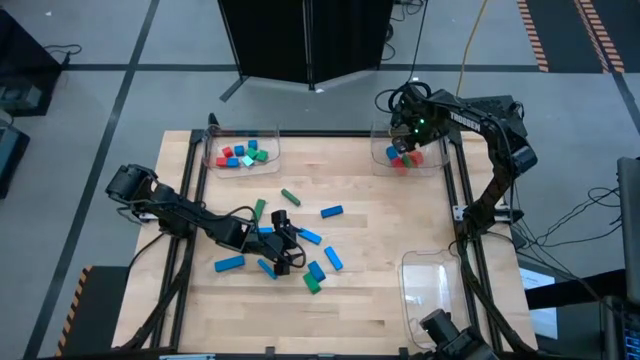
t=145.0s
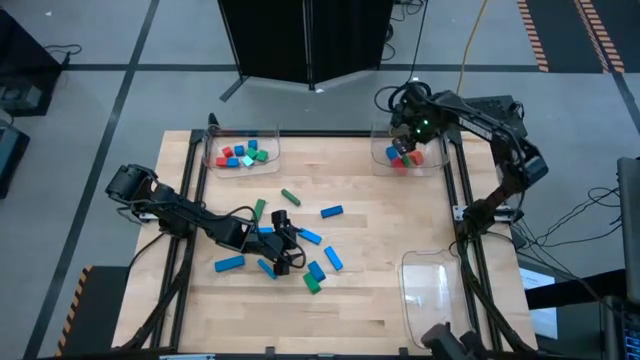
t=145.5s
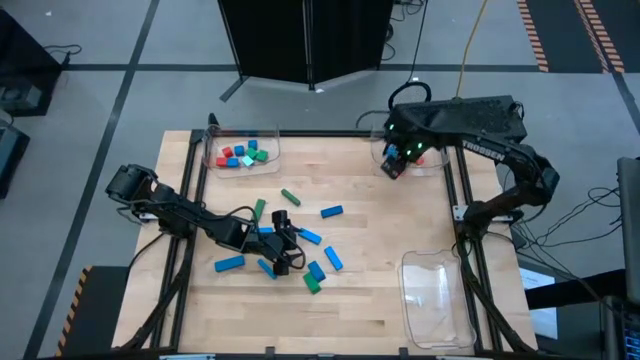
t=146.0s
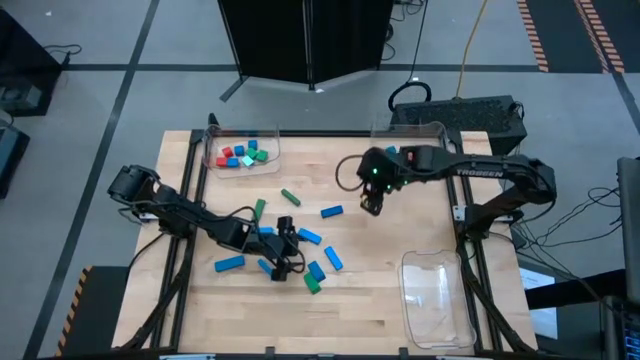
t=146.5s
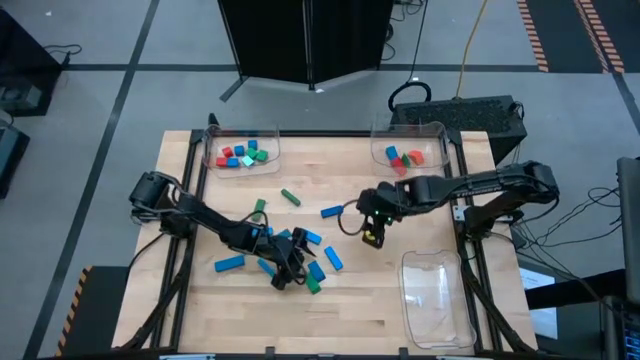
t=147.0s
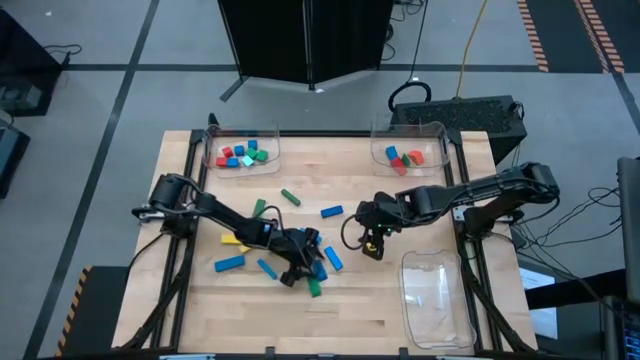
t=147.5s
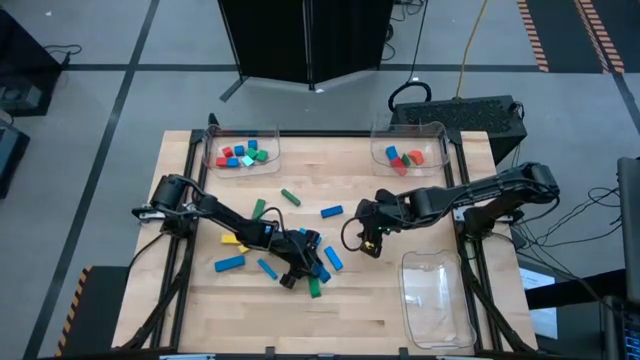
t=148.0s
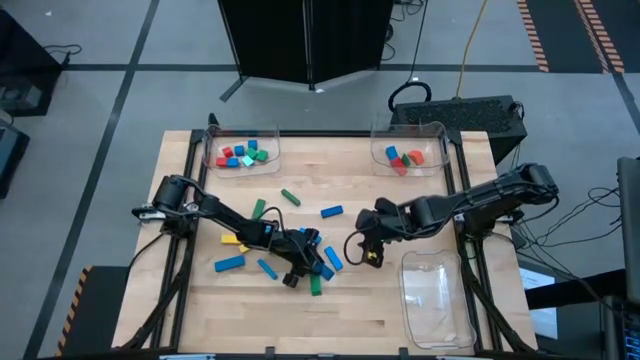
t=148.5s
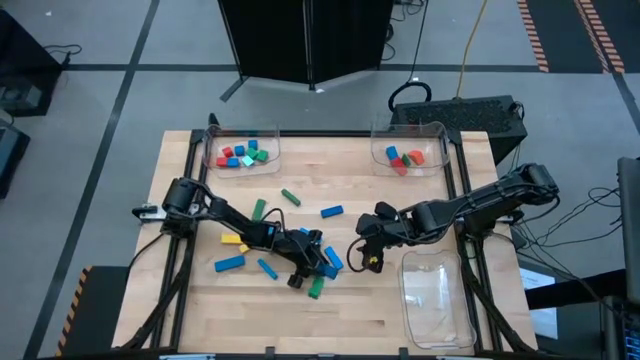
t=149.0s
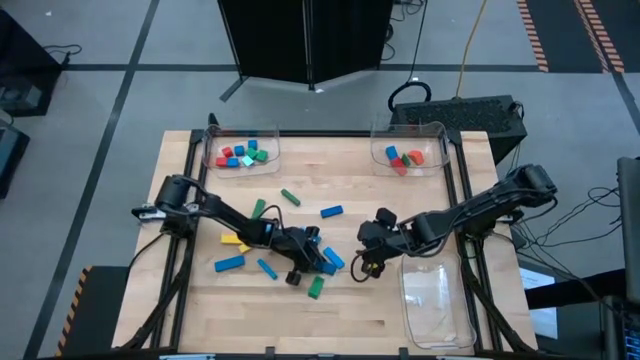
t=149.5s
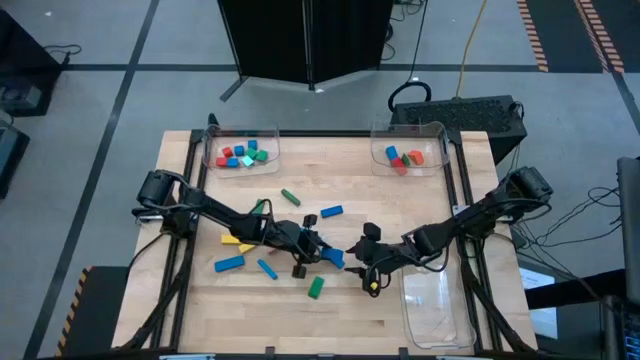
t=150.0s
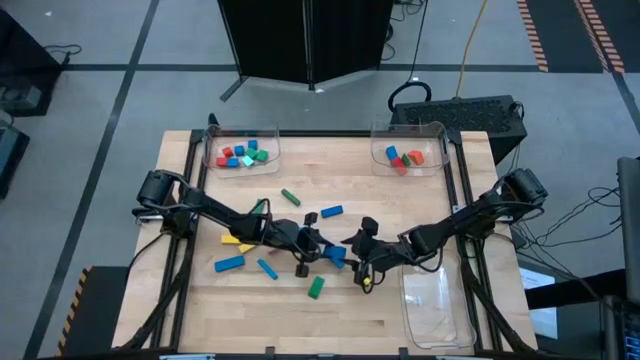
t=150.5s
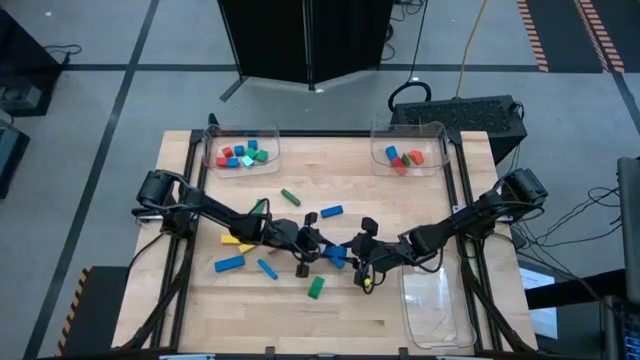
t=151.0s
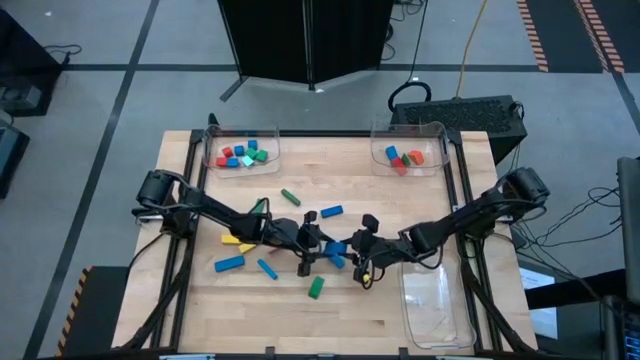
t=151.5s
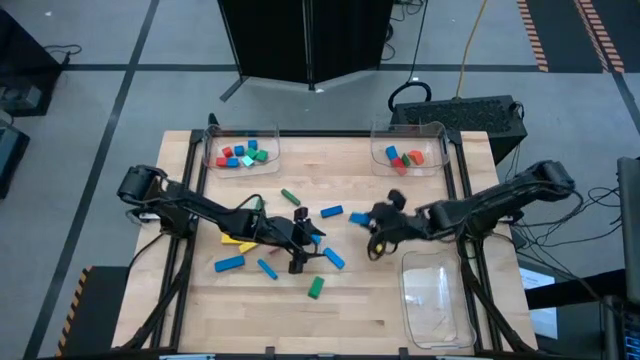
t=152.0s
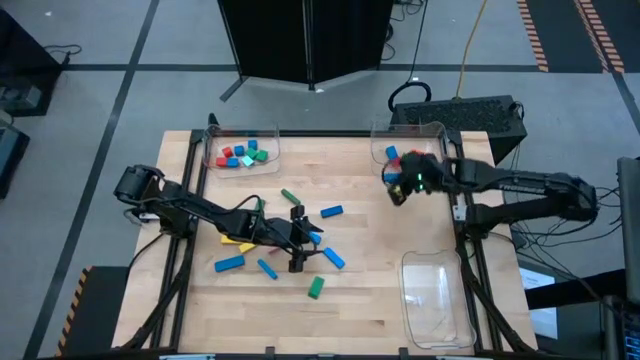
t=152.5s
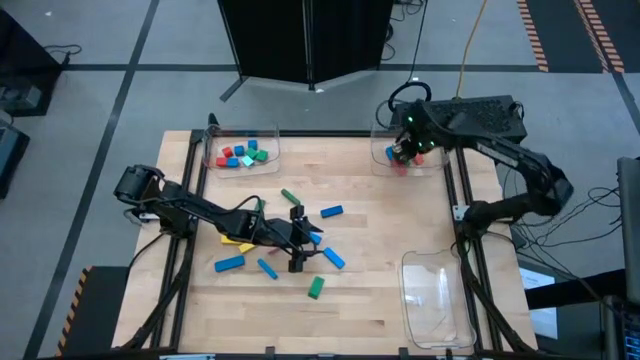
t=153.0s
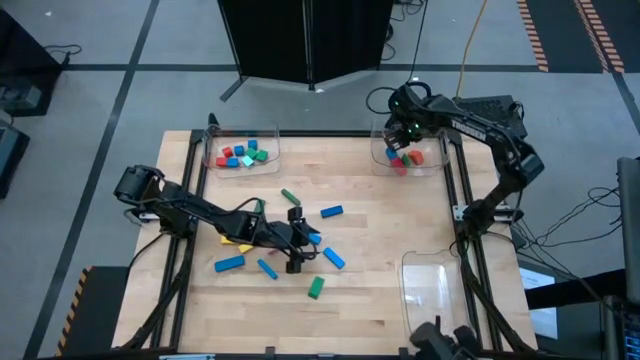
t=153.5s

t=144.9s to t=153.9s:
Task: Sort blocks by size
Put the blue triangular block into the top right transparent bin

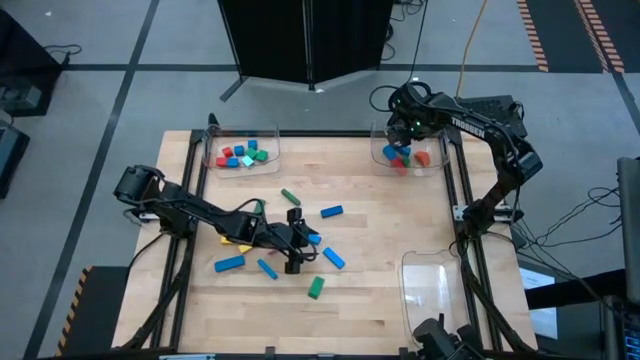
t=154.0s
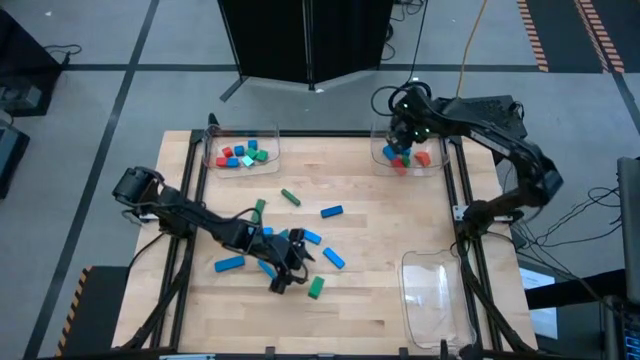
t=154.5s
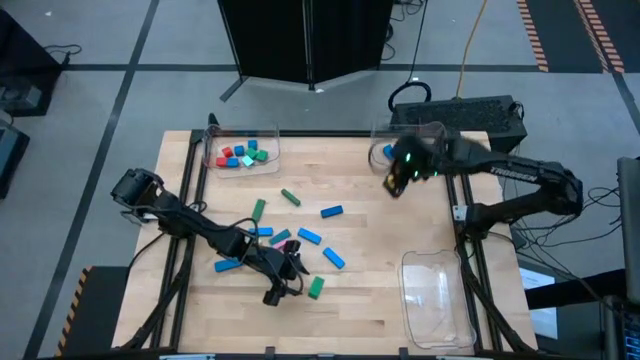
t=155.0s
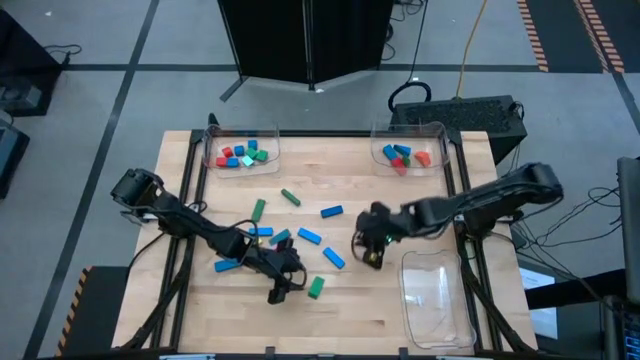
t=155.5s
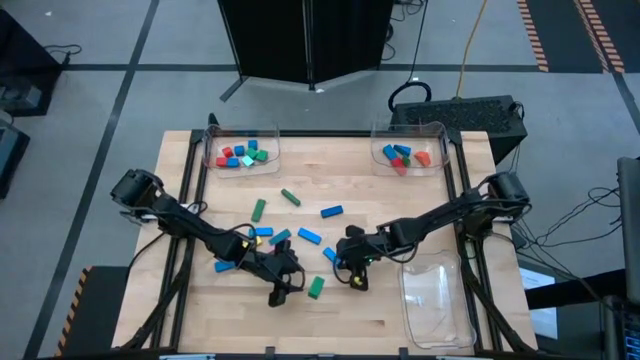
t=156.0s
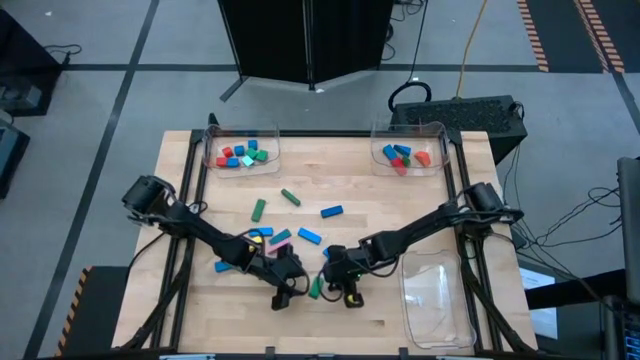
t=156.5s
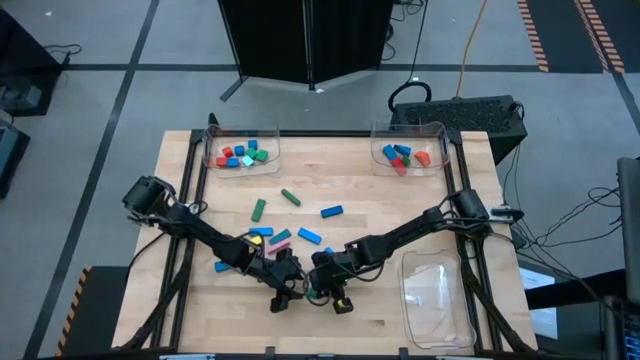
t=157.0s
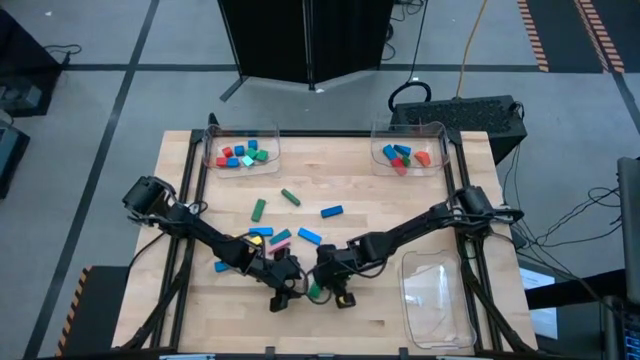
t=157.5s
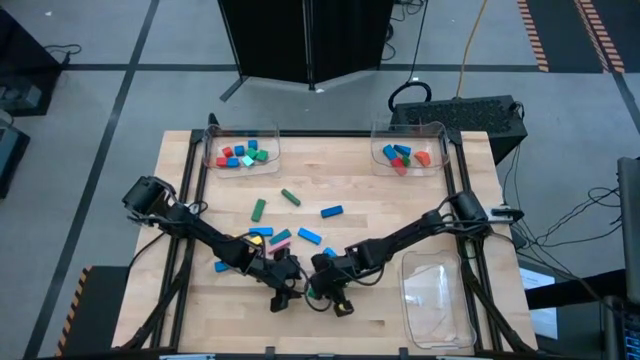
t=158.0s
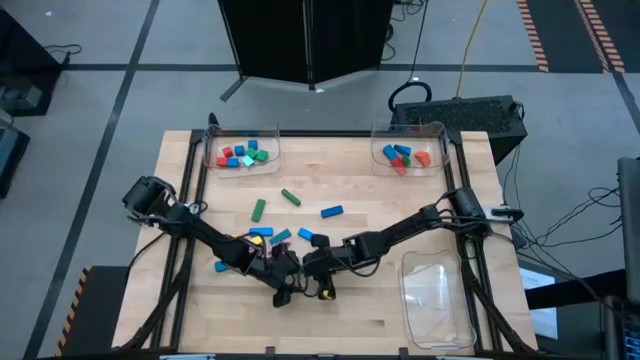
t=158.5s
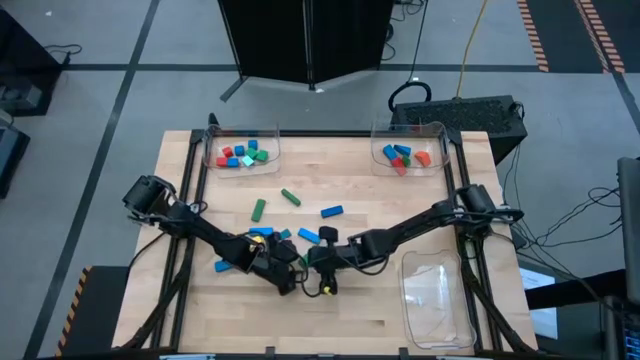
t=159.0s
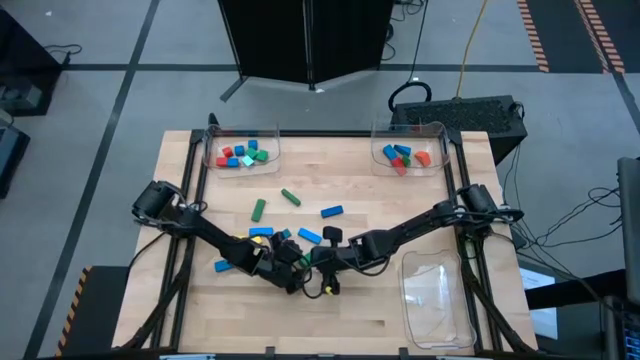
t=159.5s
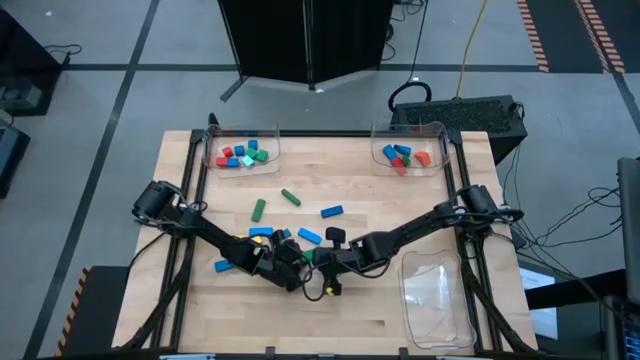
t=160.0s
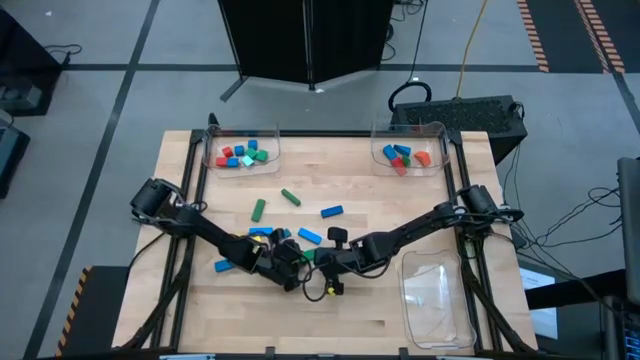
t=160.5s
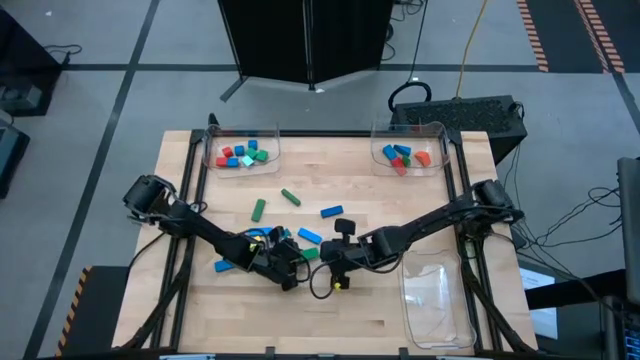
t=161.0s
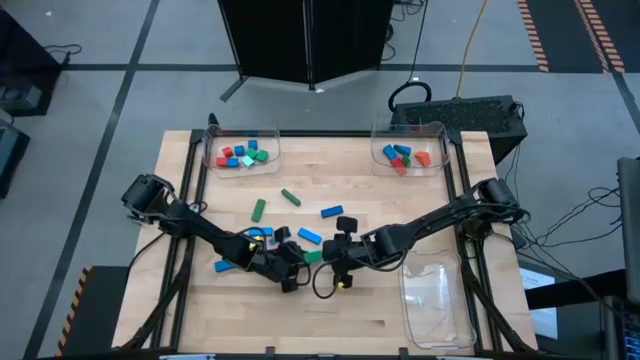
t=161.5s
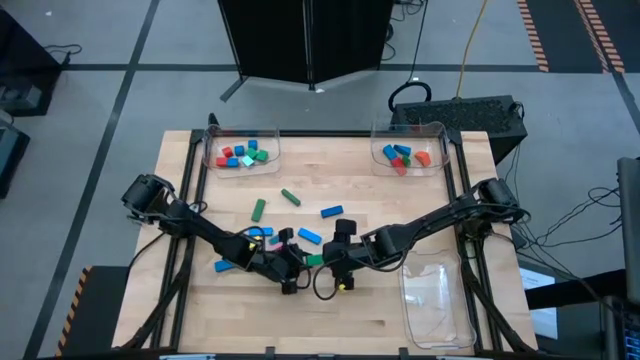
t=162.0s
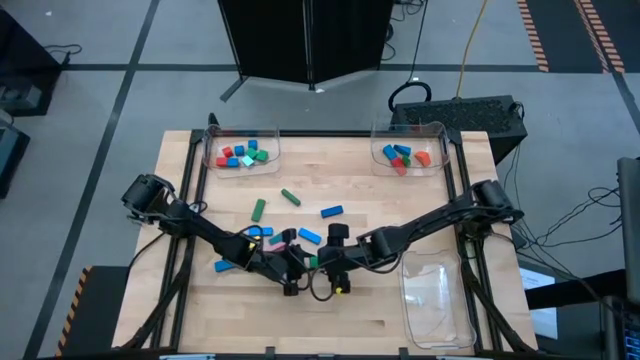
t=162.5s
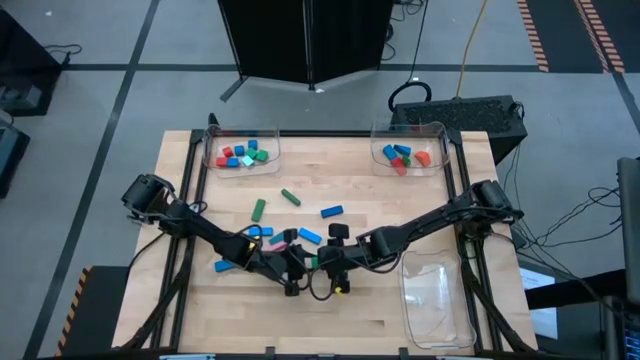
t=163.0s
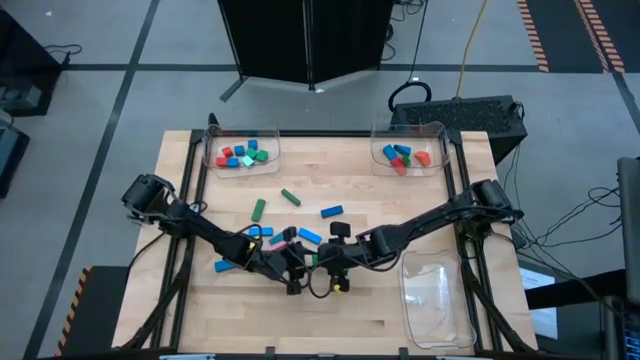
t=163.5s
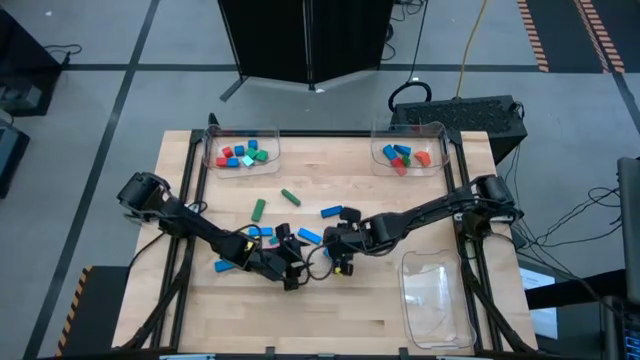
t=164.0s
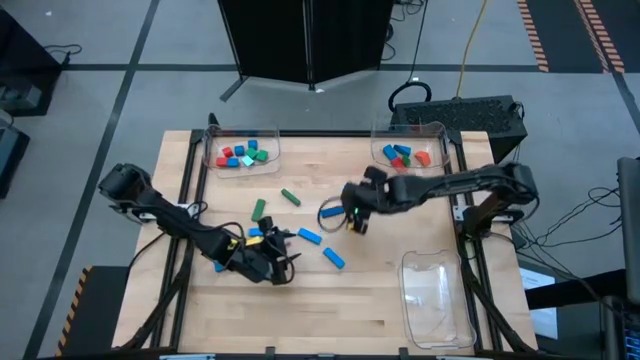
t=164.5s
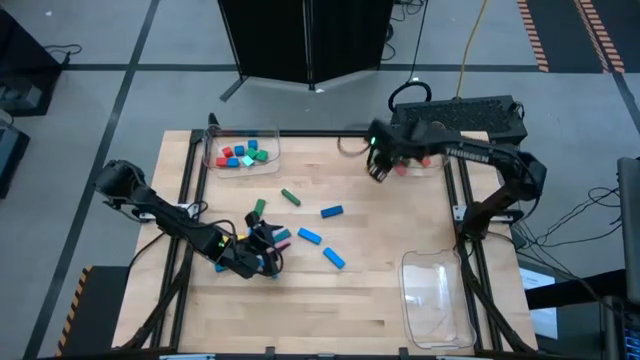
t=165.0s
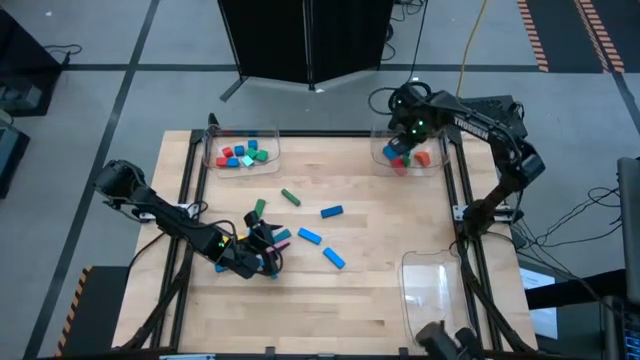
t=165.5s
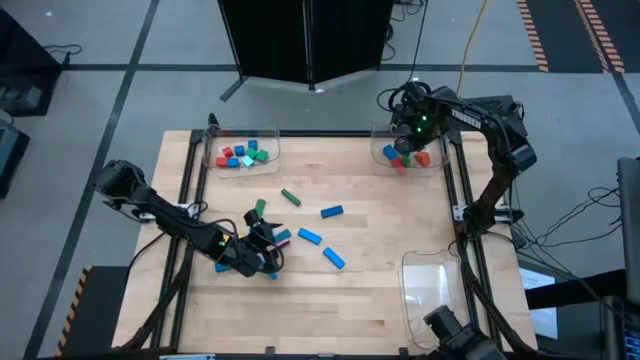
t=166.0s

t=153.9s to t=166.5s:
Put the green triangular block into the top right transparent bin
